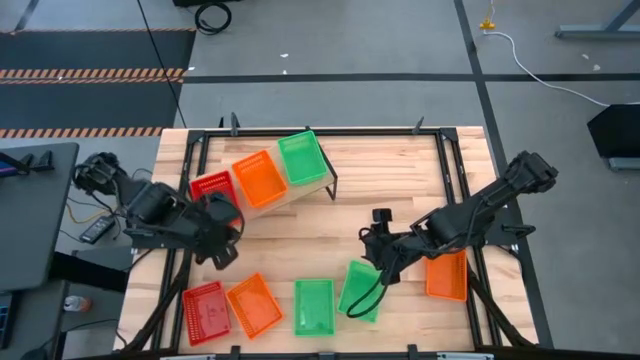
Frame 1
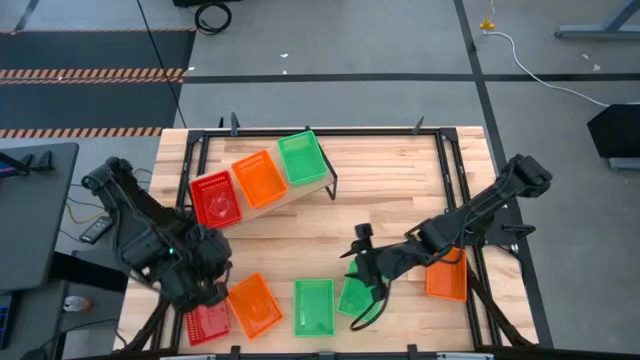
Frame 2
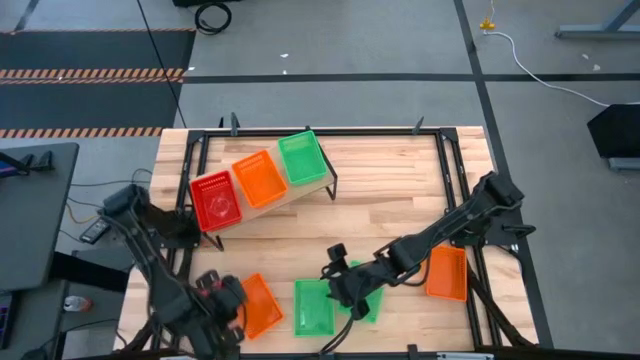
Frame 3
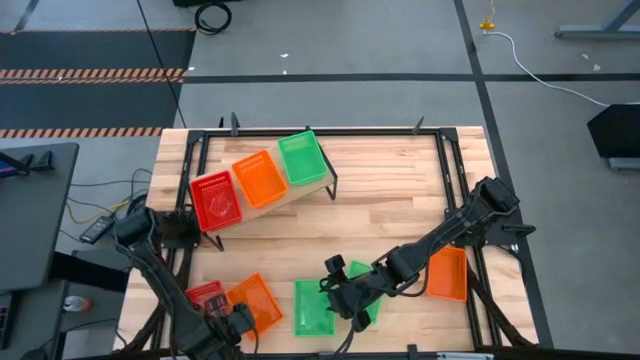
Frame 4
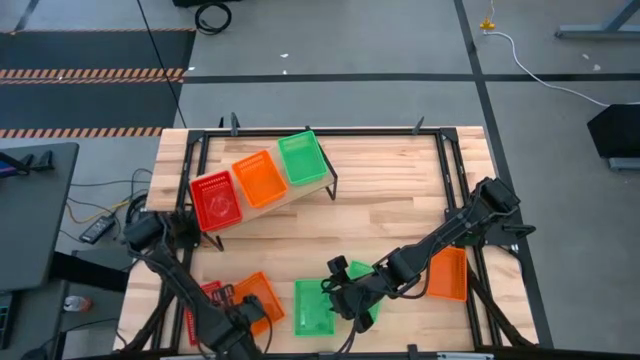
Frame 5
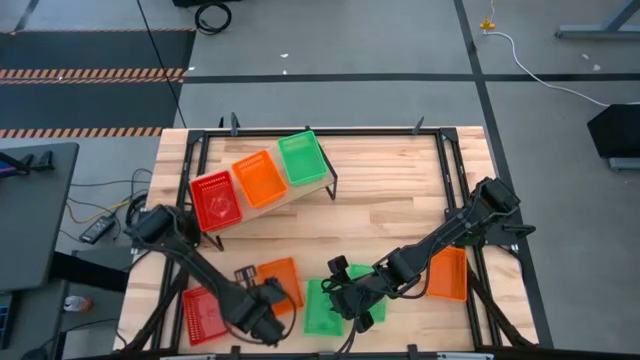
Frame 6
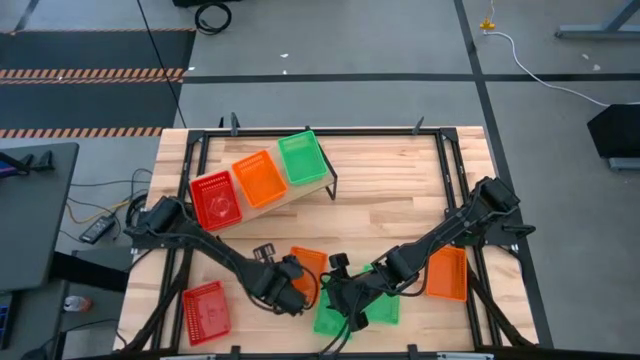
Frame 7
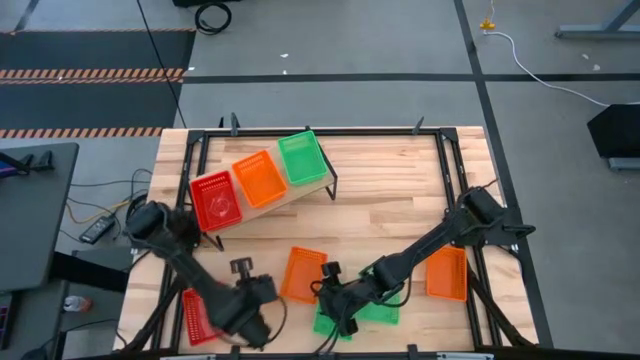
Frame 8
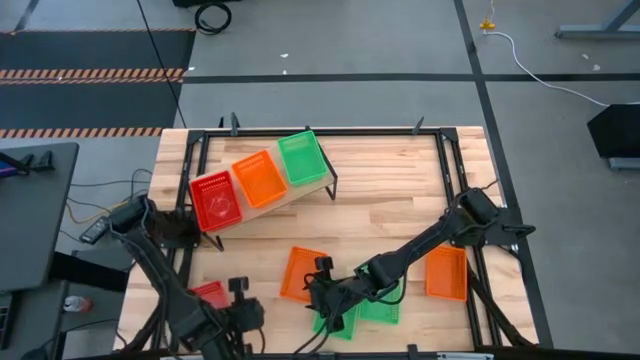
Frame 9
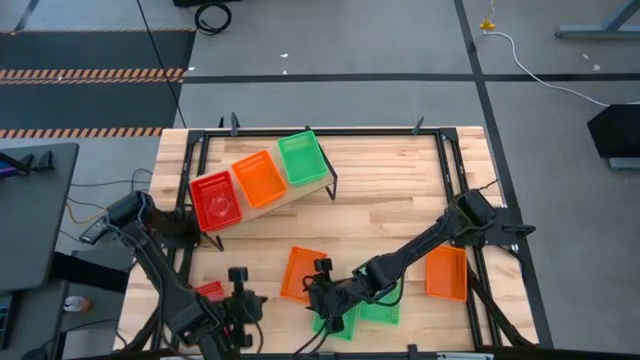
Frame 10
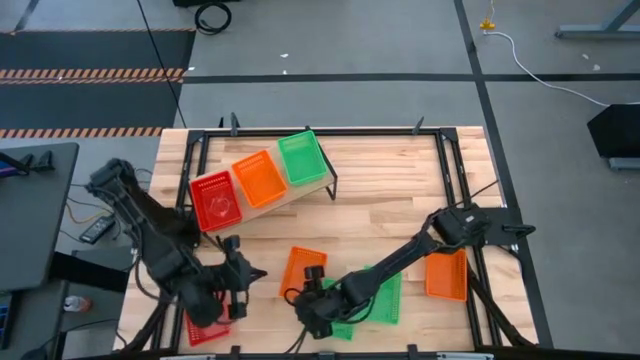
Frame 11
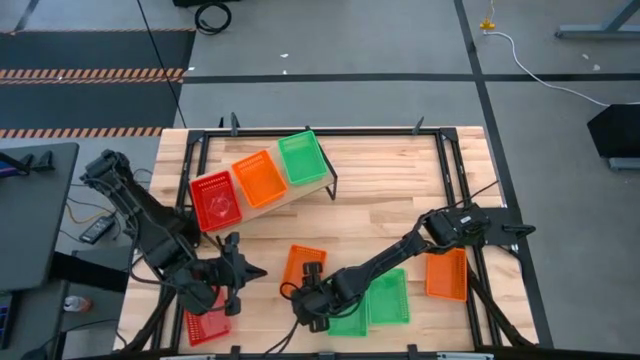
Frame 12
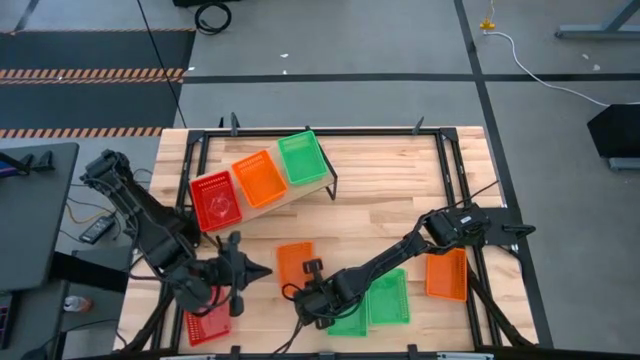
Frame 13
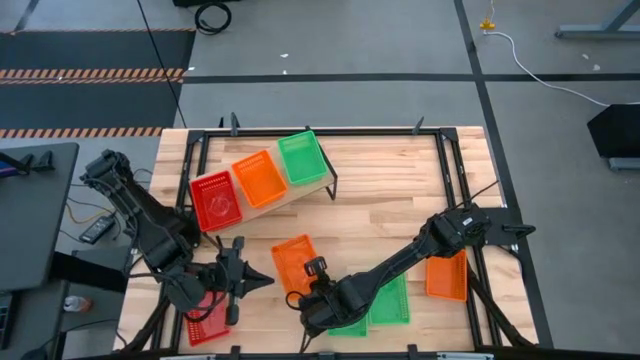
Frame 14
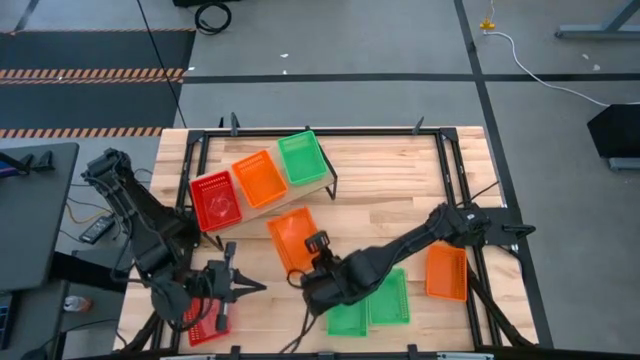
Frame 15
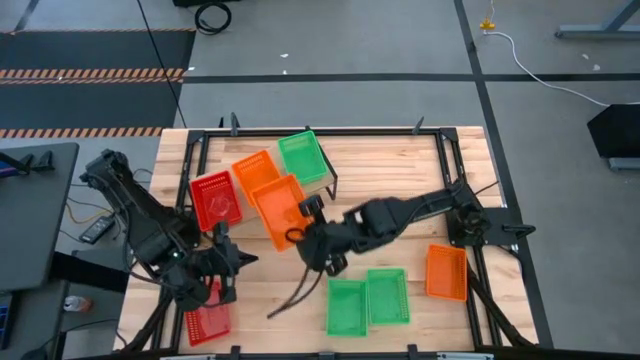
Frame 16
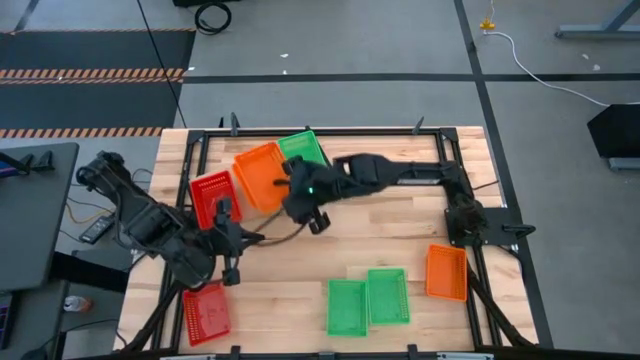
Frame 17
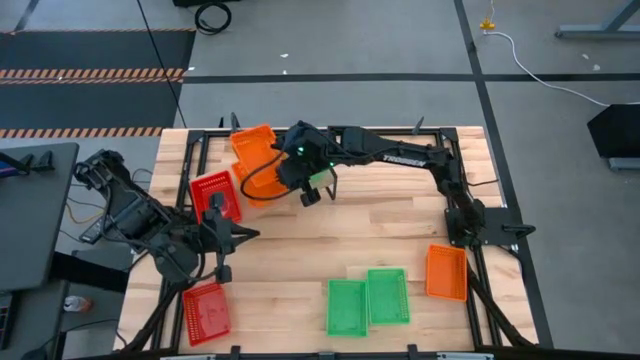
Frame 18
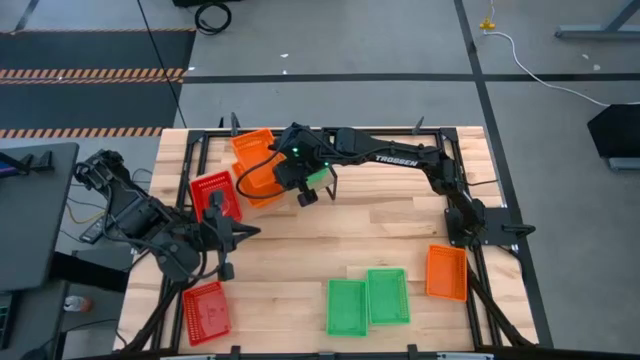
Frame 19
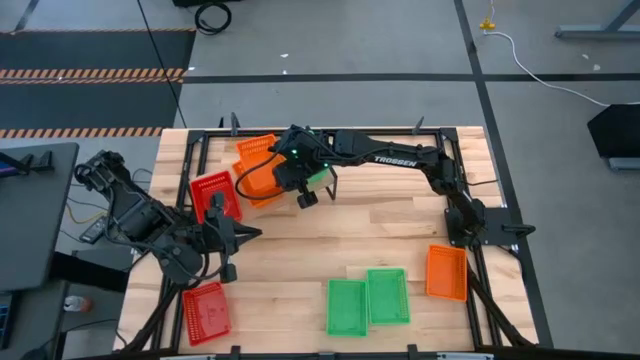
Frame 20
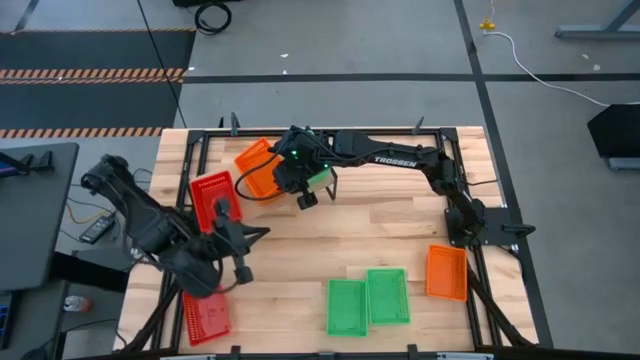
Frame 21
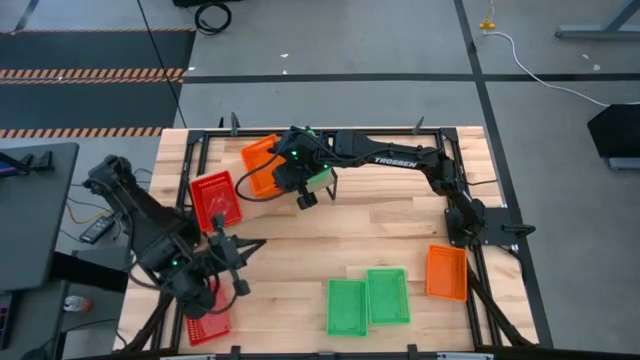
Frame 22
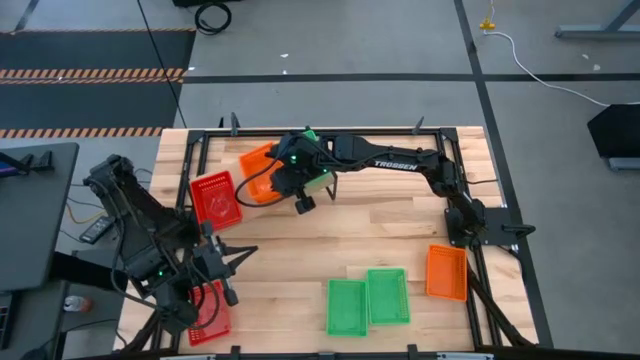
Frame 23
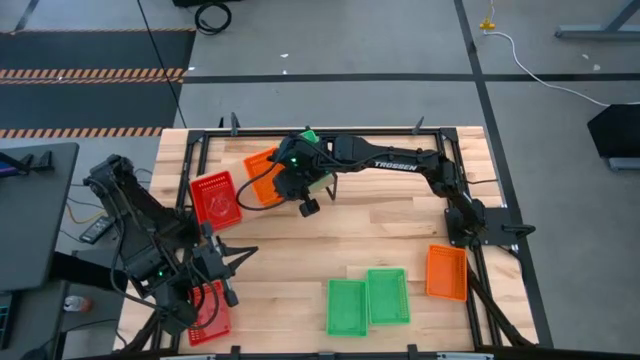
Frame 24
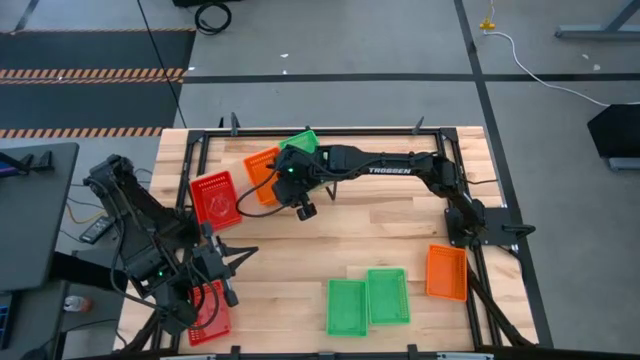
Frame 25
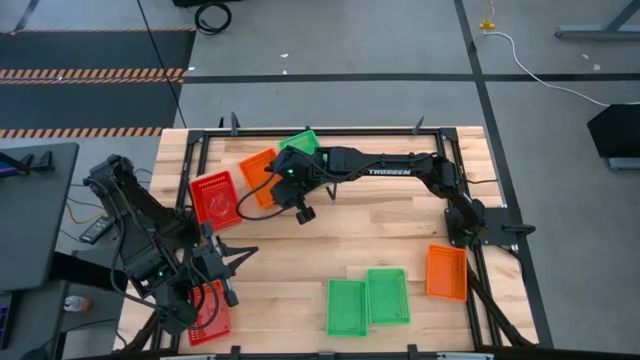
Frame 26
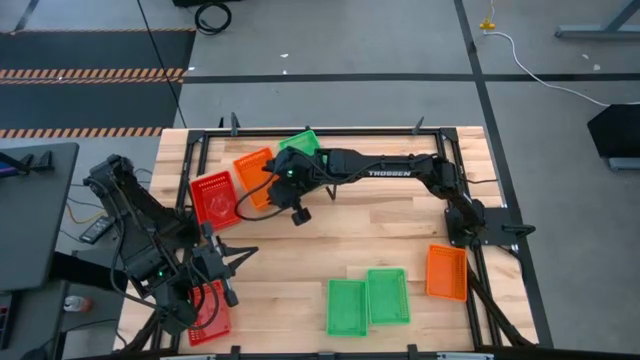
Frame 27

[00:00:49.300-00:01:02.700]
Task: Stack baskets on shelf by color
Stack the left orange bin on the orange bin on the shelf

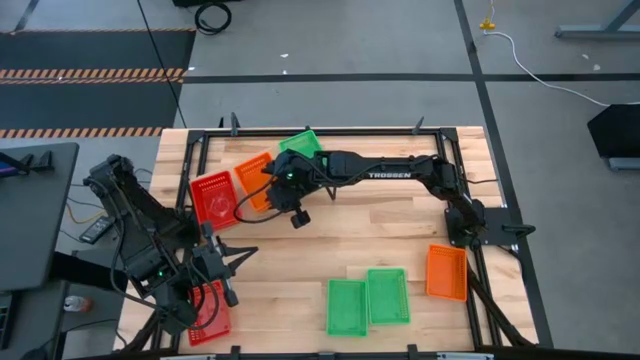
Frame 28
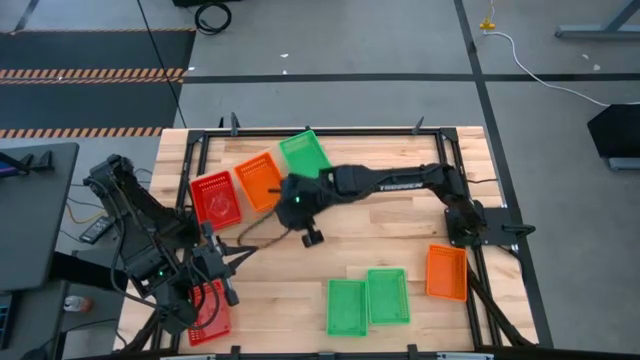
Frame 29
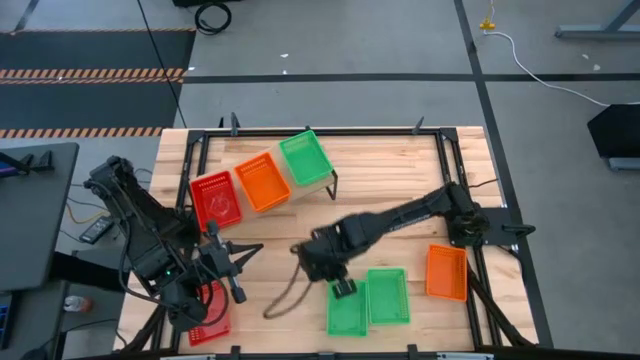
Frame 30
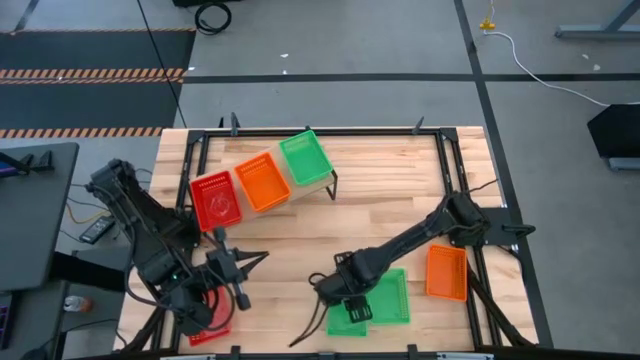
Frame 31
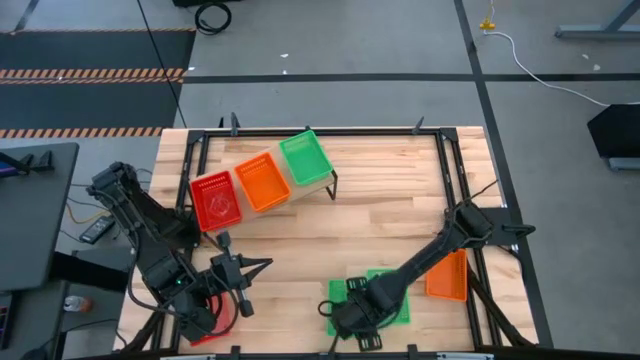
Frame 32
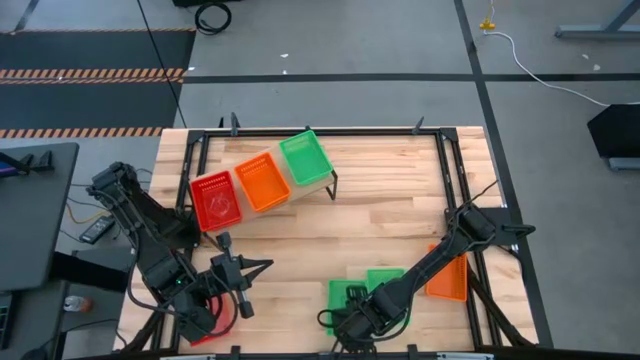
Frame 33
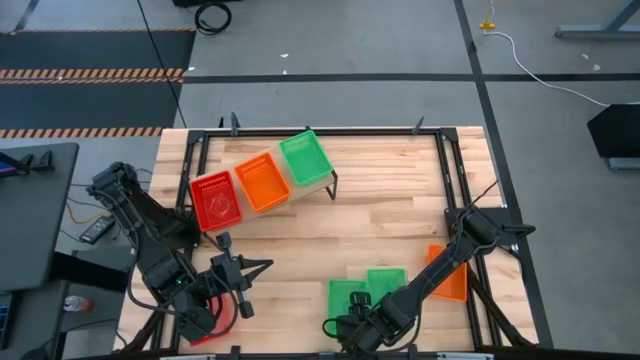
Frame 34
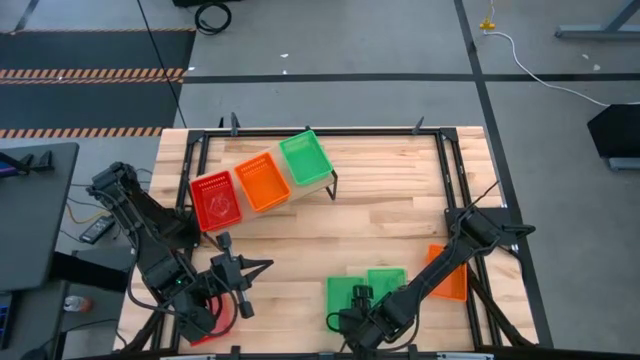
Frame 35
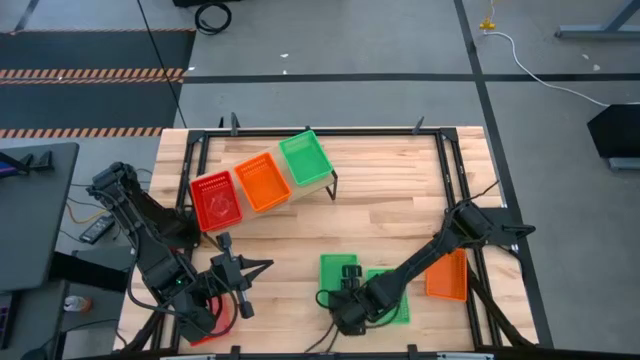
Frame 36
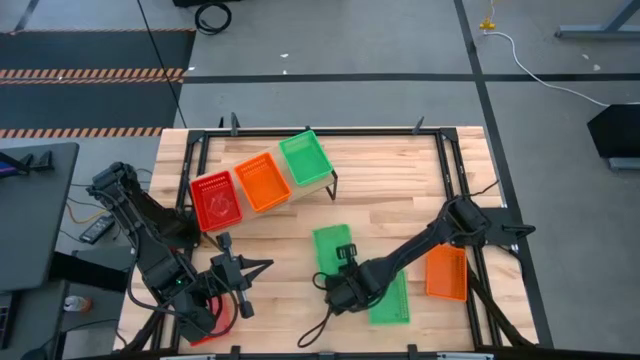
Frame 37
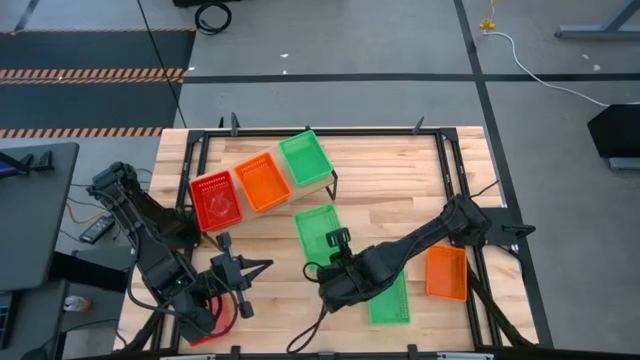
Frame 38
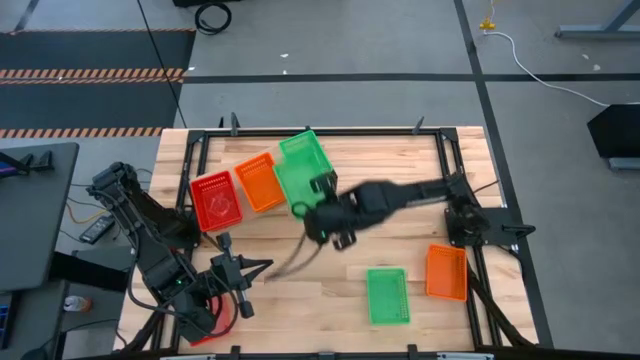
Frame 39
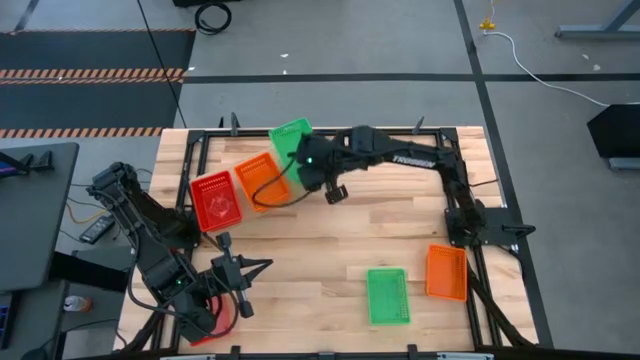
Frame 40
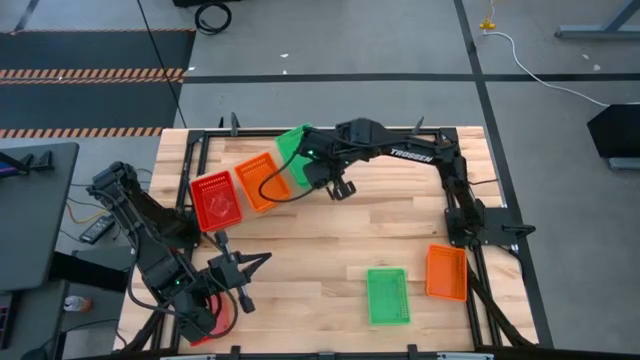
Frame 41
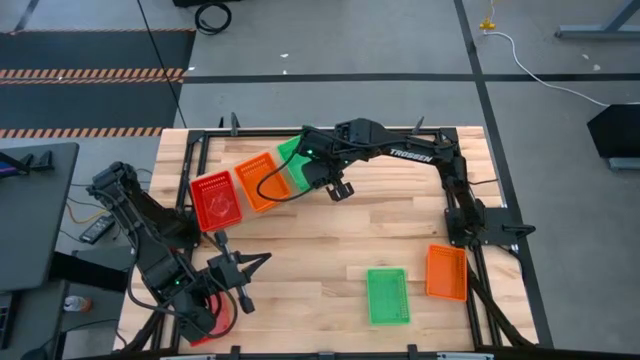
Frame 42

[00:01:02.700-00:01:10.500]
Stack the left green bin on the green bin on the shelf
